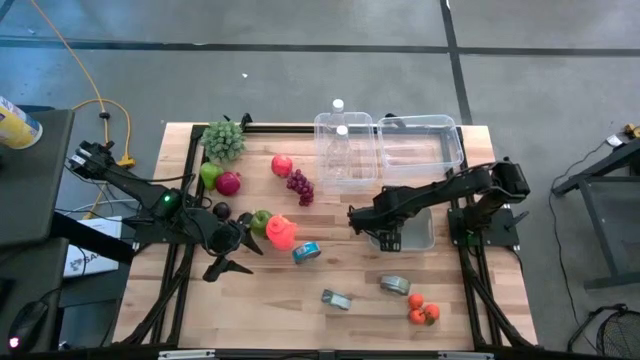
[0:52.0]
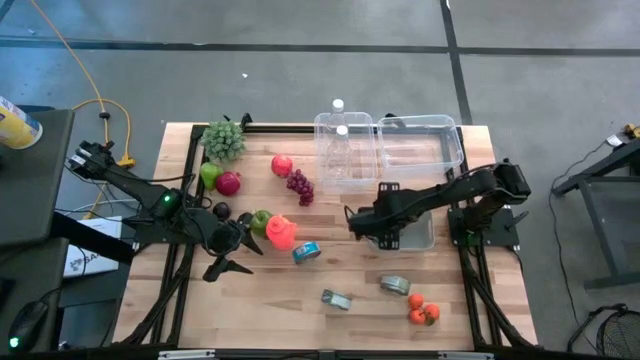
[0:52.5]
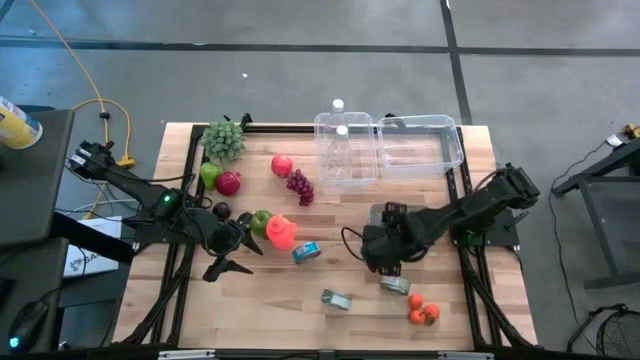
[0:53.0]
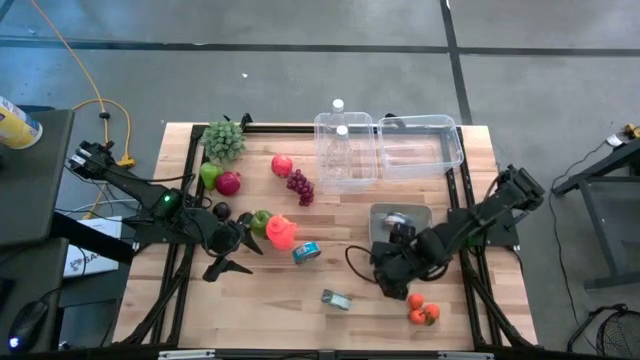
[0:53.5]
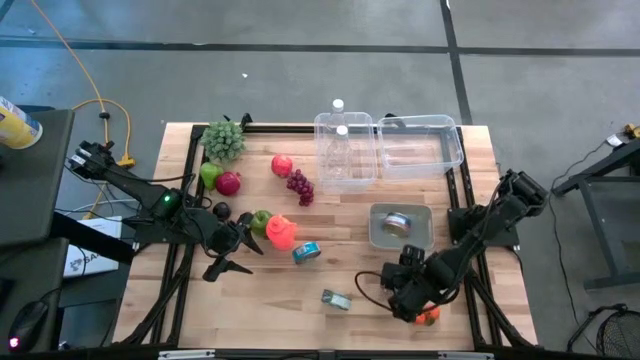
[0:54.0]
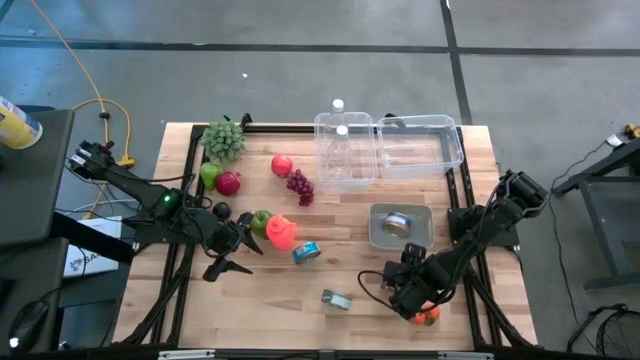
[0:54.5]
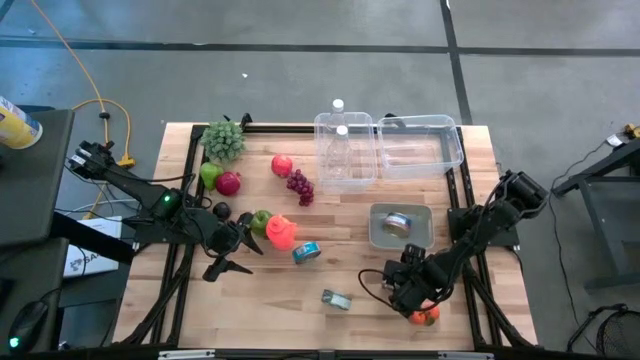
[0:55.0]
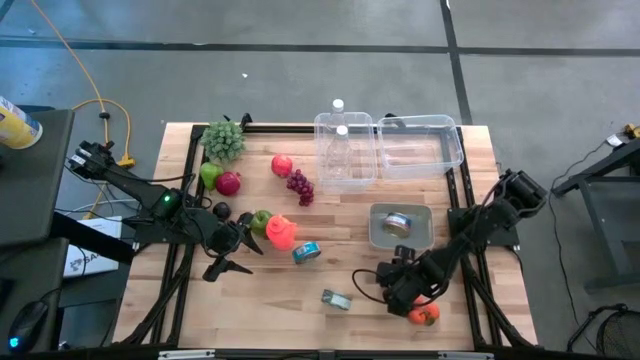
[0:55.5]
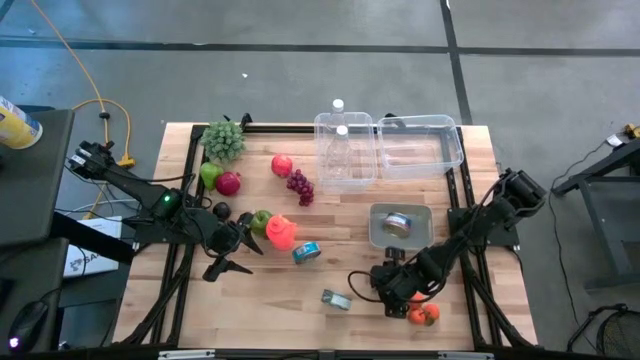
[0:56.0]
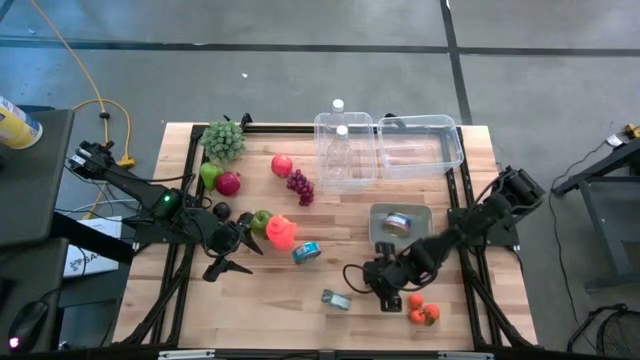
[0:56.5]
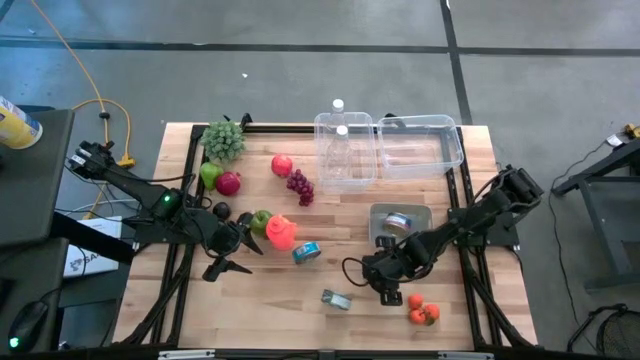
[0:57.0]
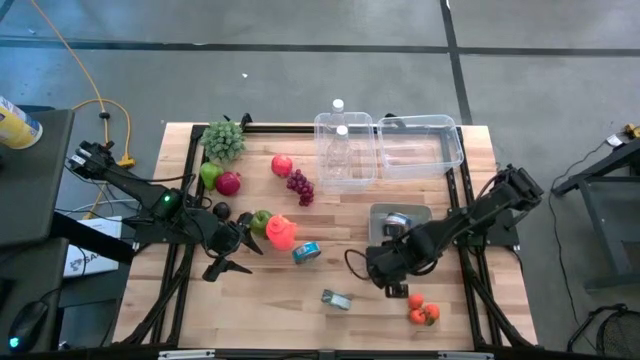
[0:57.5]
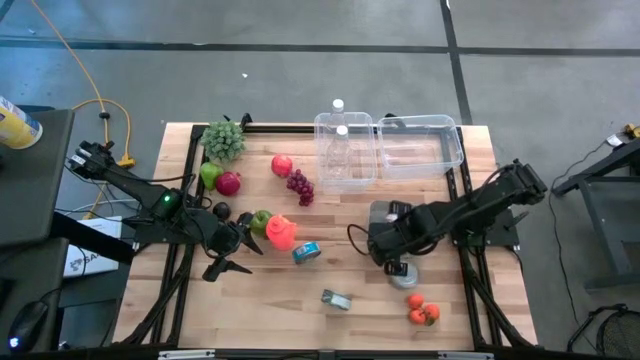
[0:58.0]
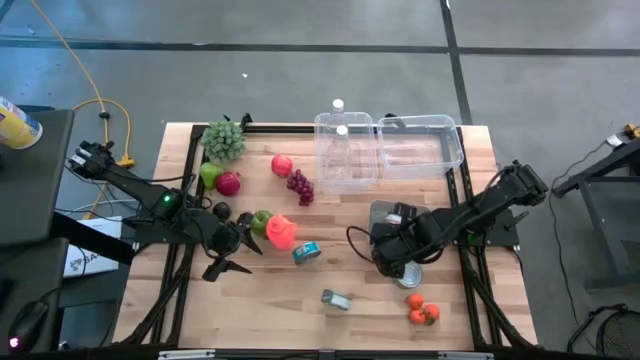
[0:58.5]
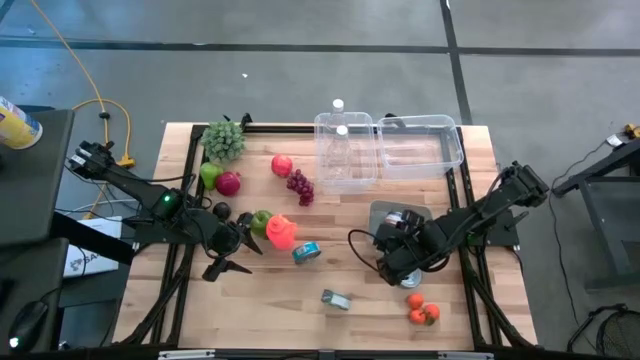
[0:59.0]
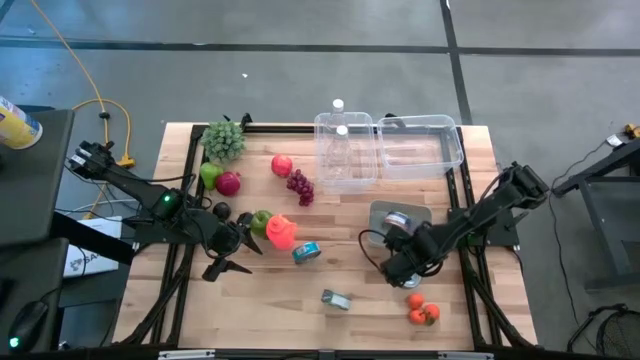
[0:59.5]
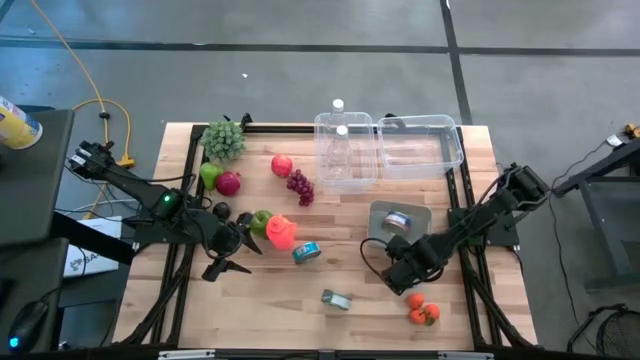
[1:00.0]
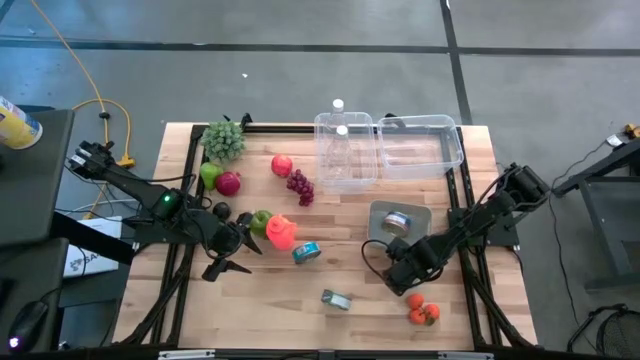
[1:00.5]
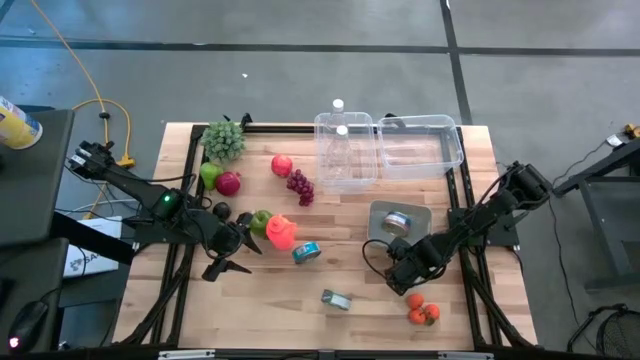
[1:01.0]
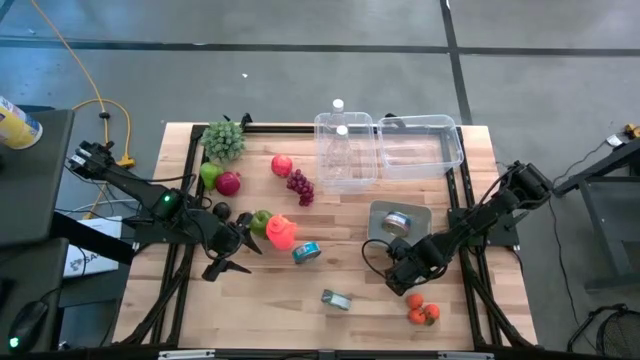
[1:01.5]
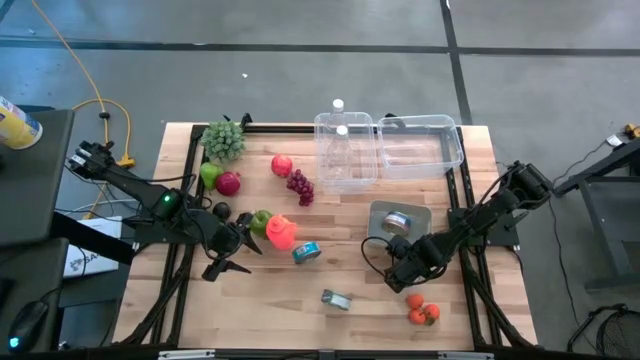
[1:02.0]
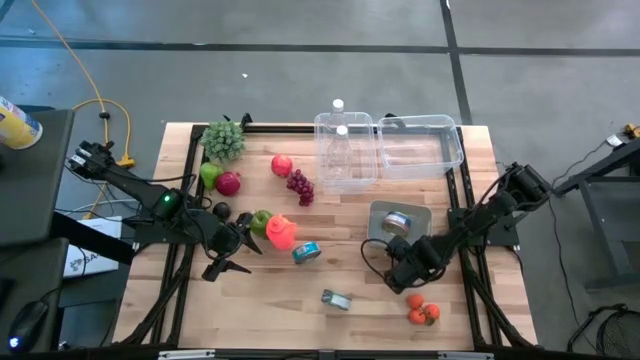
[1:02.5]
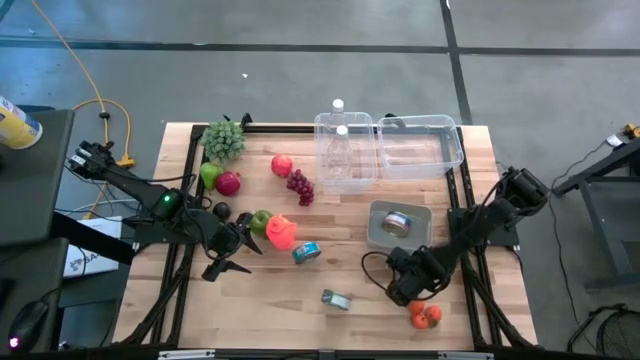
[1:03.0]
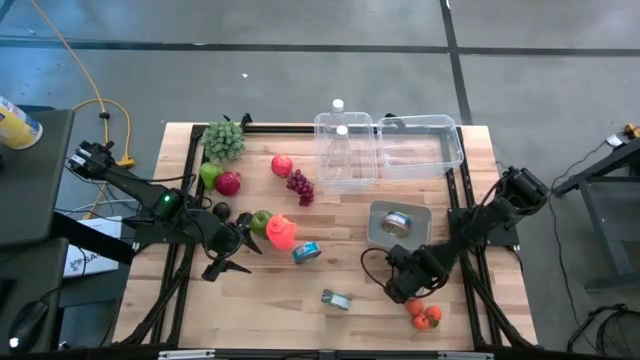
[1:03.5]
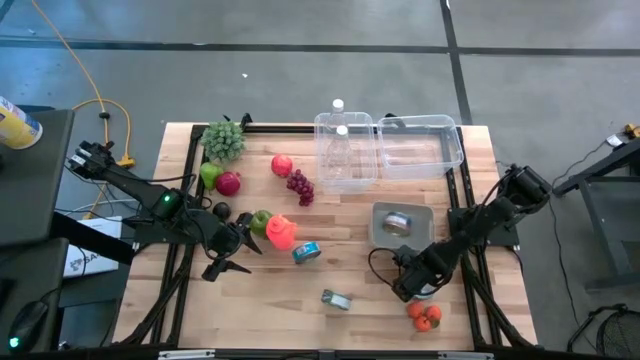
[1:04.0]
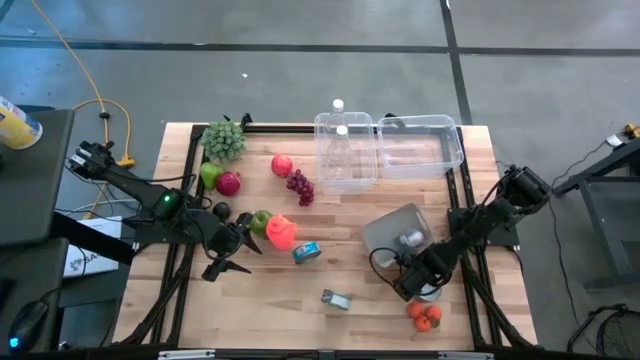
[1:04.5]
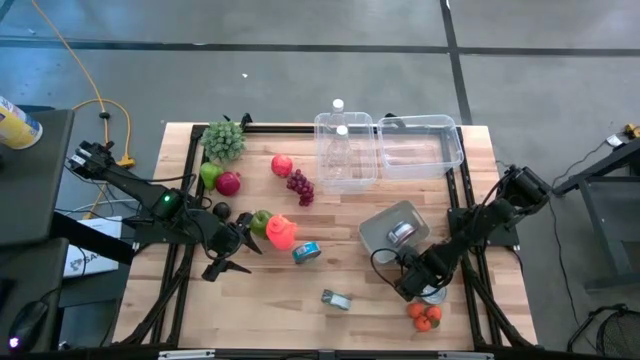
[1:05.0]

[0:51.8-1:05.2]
Task: Pick & Place Food Item
Put the right green tuna can into the gray bin

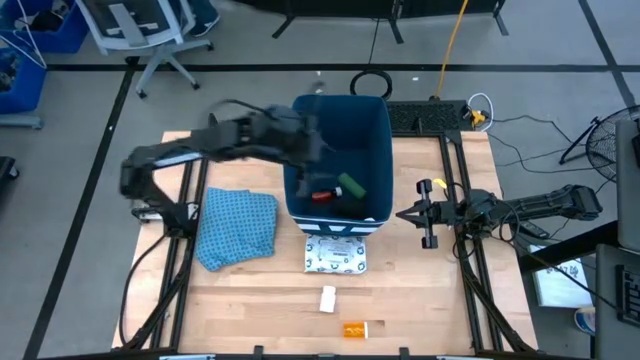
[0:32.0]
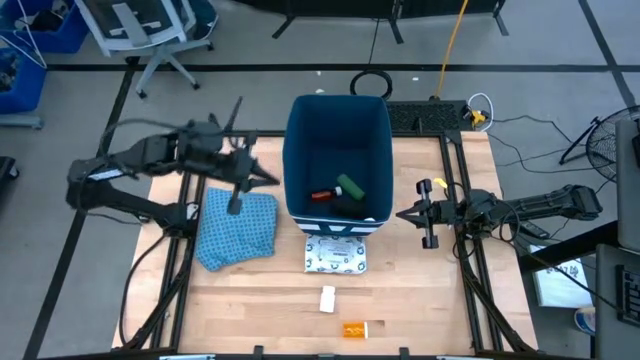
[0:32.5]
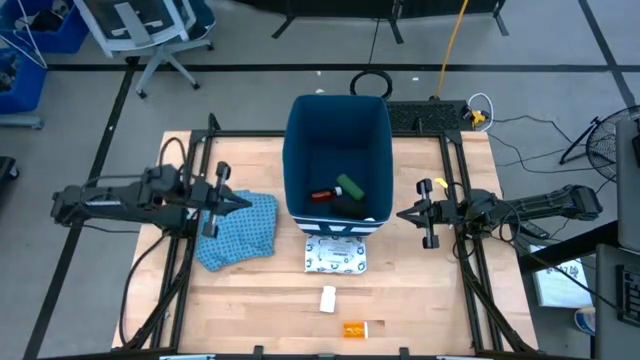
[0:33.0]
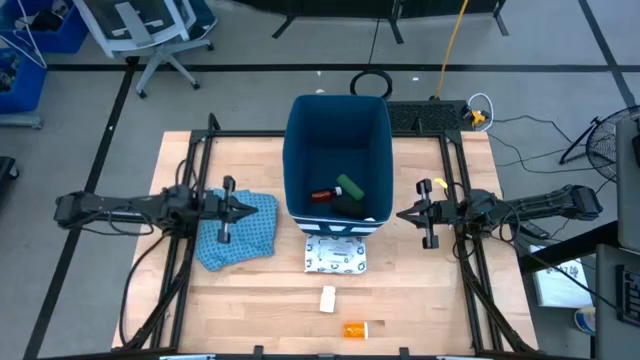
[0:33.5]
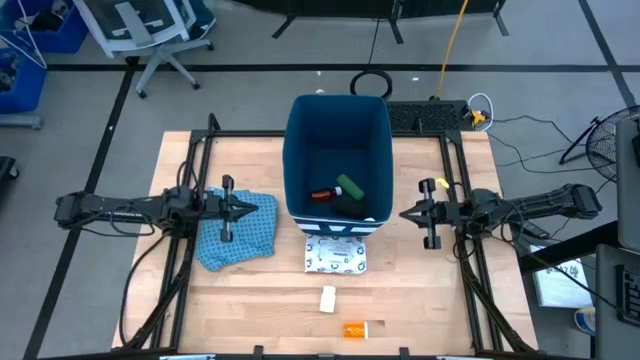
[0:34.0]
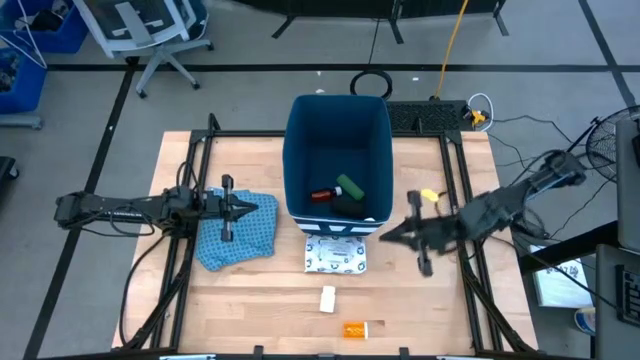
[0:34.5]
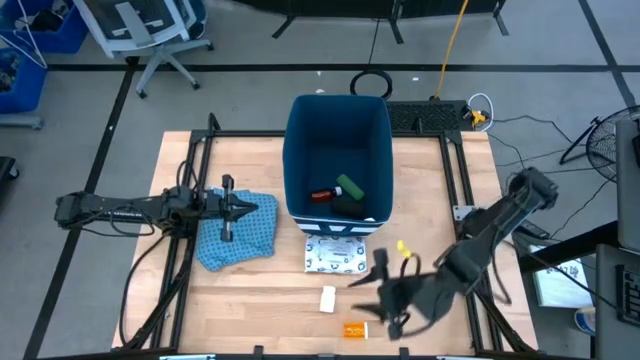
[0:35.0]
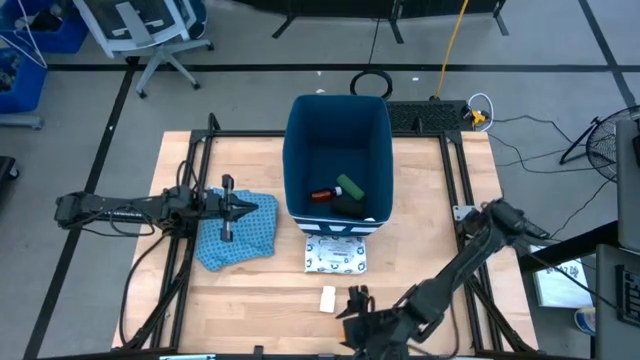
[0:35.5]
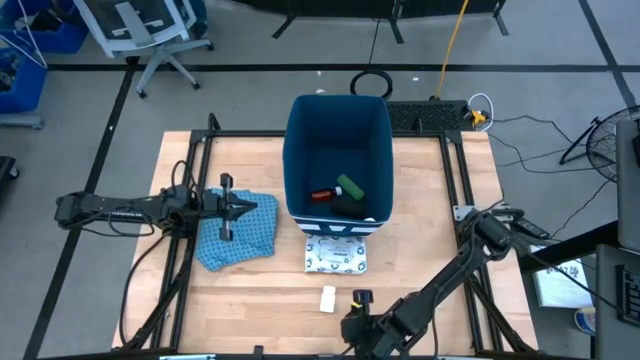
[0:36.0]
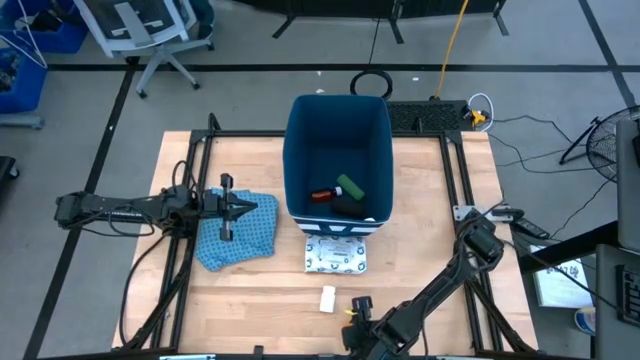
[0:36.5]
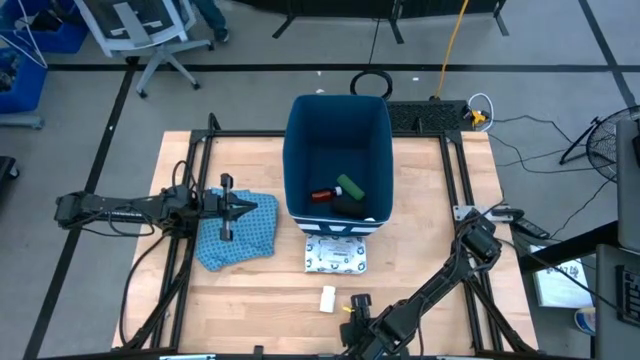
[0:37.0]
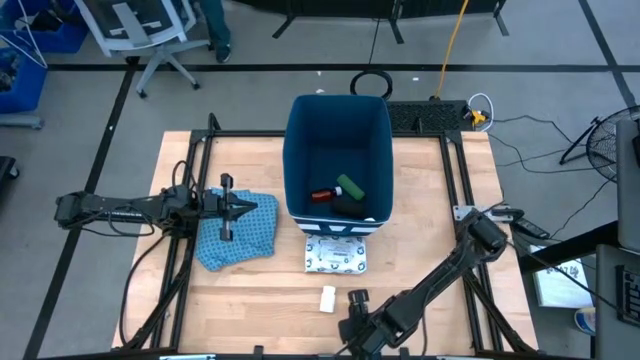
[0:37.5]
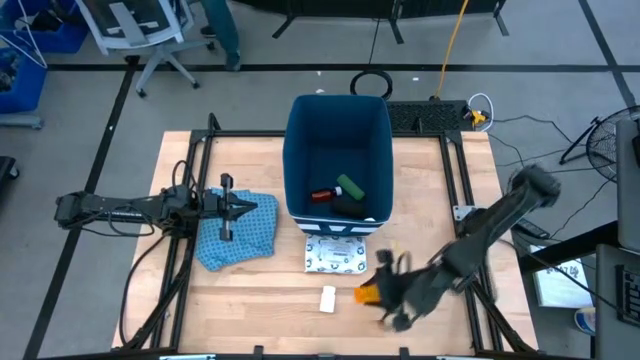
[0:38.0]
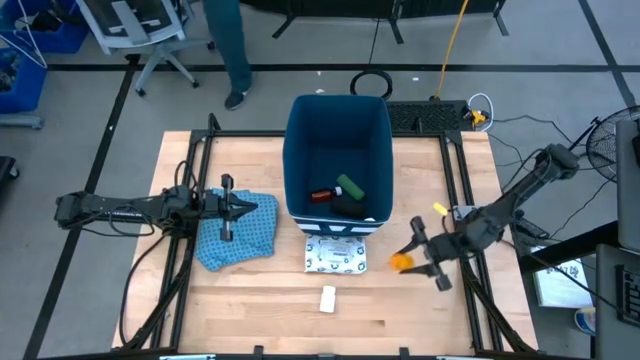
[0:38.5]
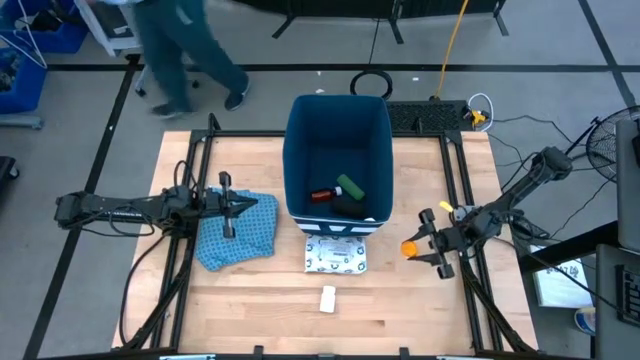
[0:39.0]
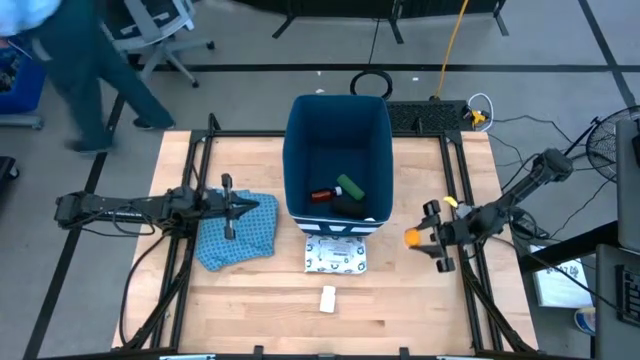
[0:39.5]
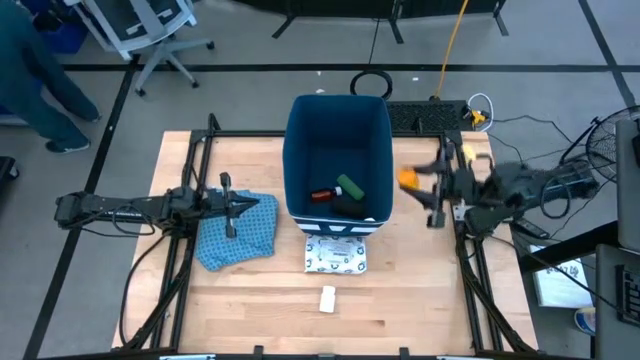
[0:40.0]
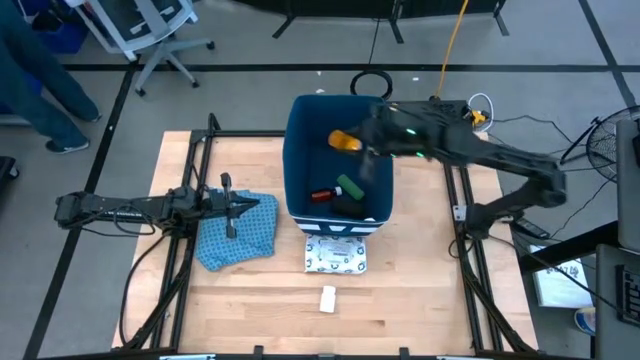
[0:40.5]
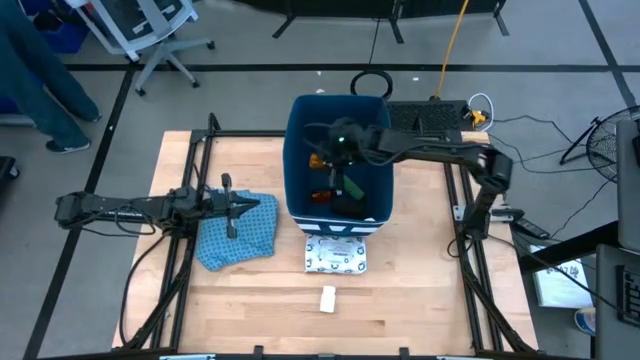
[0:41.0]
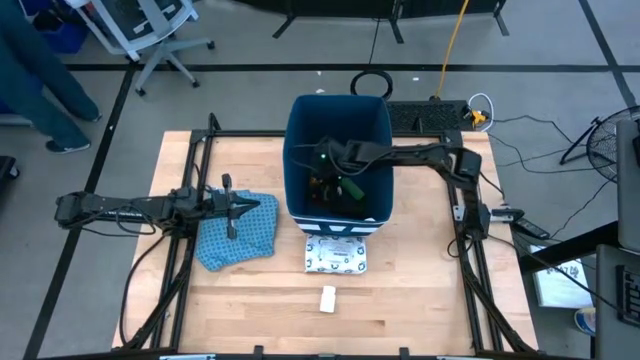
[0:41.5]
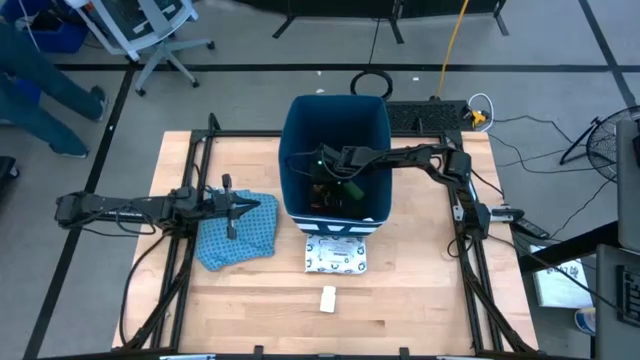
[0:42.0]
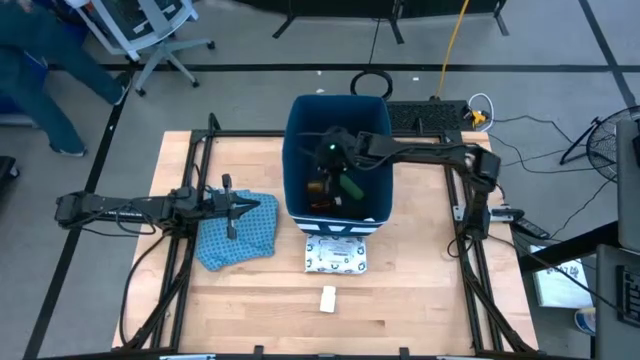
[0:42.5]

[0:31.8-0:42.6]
Task: Pick & place medical supplies in basket/bin
Put the orange pill bottle into the blue bin
